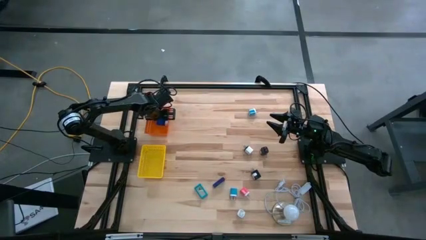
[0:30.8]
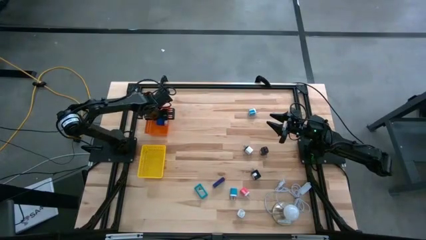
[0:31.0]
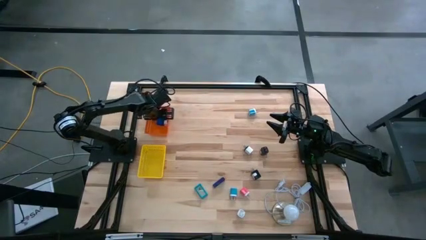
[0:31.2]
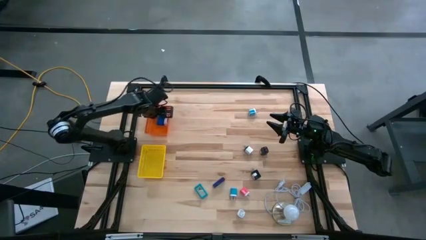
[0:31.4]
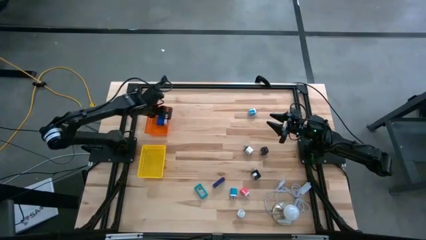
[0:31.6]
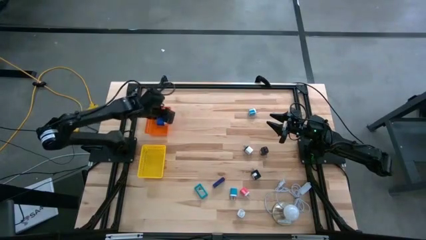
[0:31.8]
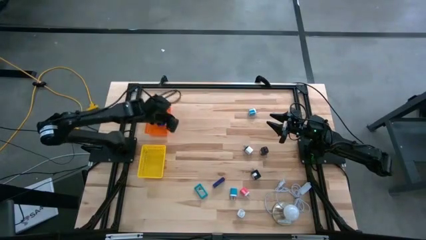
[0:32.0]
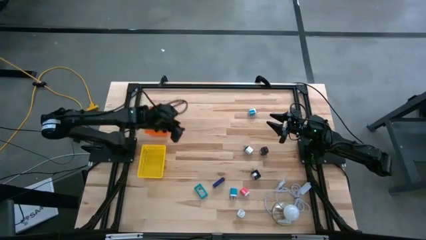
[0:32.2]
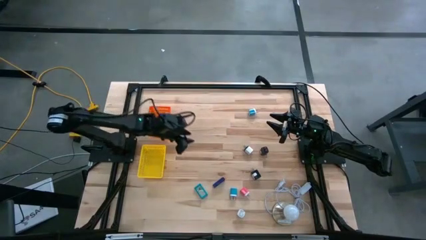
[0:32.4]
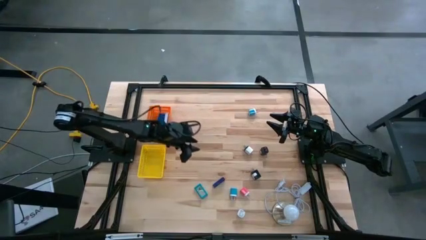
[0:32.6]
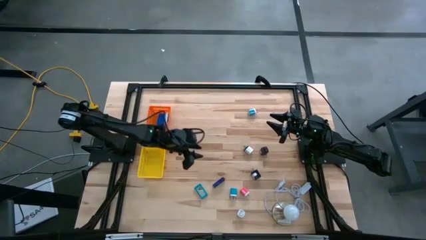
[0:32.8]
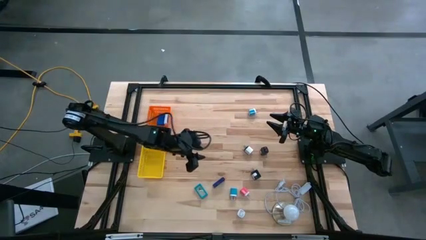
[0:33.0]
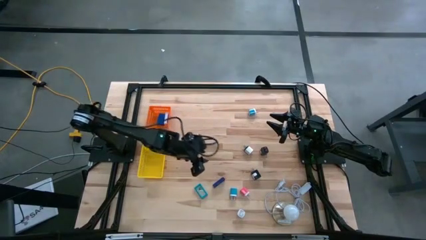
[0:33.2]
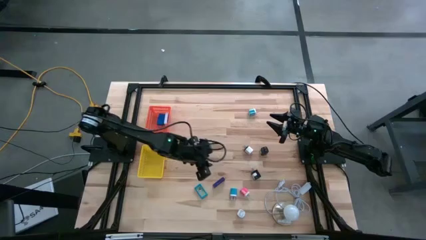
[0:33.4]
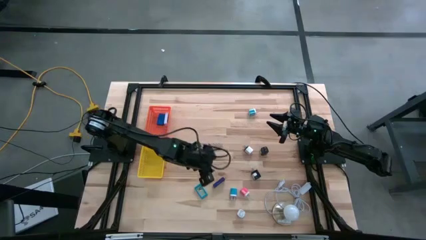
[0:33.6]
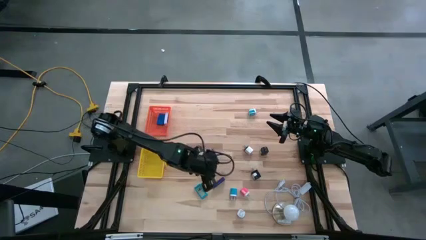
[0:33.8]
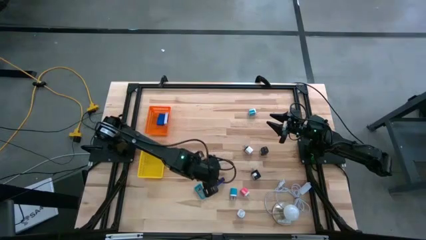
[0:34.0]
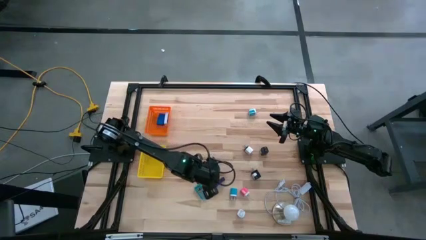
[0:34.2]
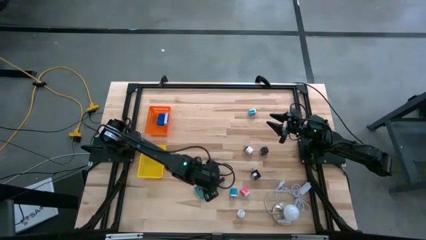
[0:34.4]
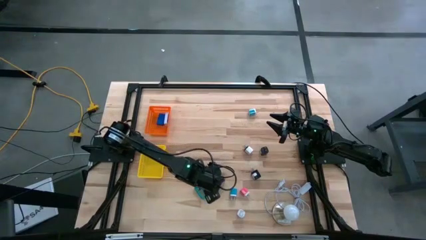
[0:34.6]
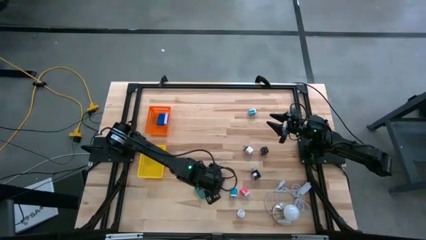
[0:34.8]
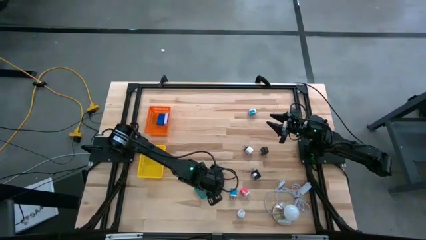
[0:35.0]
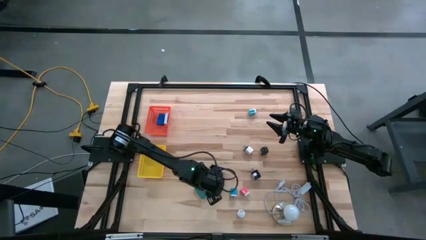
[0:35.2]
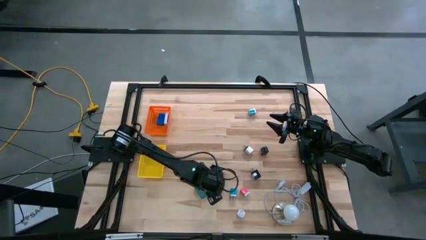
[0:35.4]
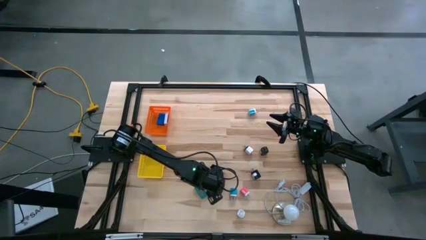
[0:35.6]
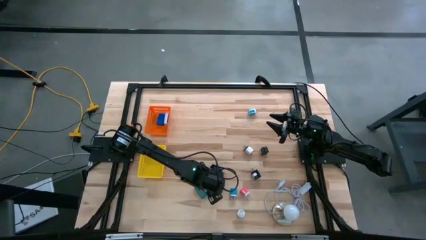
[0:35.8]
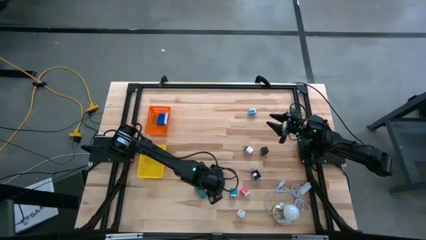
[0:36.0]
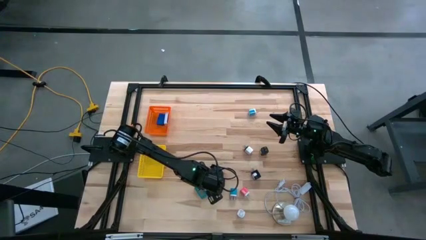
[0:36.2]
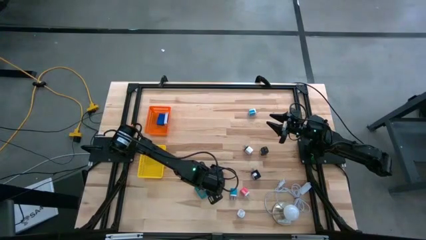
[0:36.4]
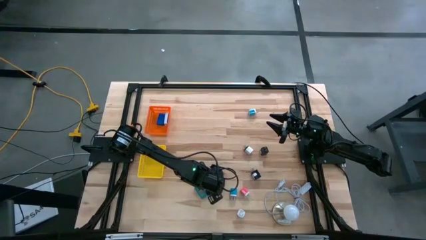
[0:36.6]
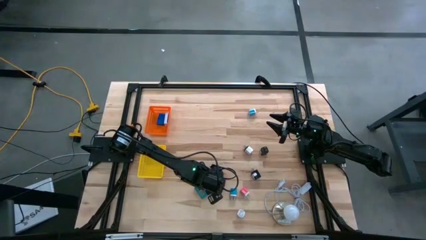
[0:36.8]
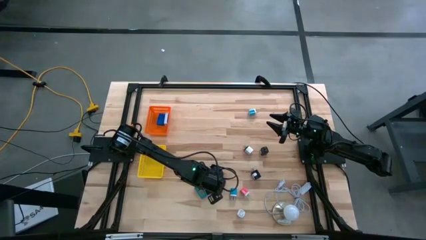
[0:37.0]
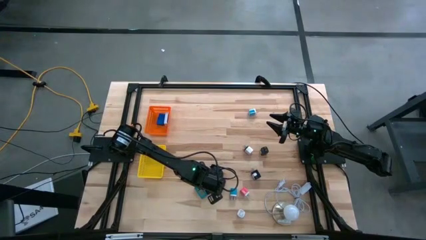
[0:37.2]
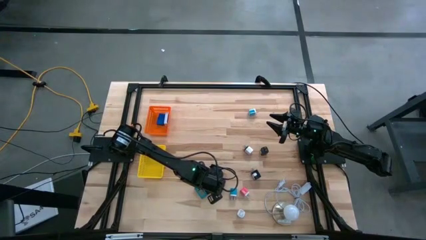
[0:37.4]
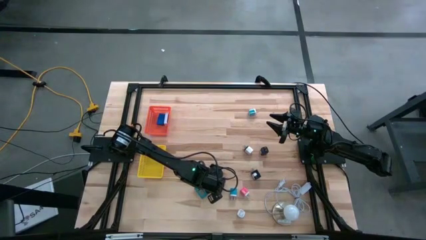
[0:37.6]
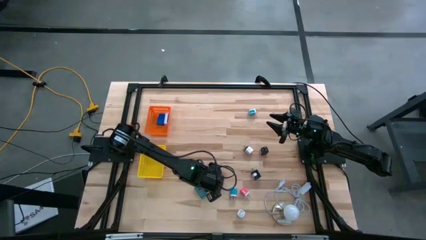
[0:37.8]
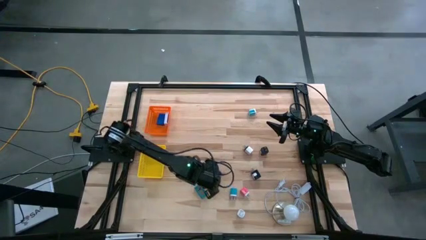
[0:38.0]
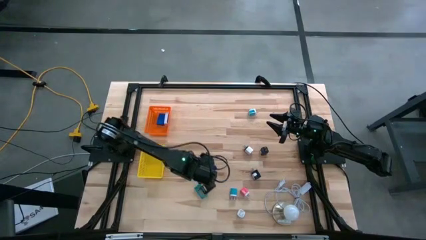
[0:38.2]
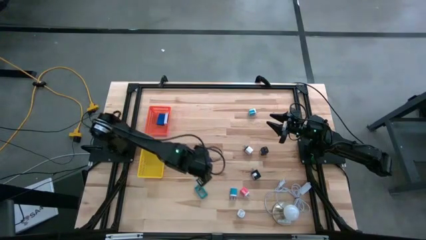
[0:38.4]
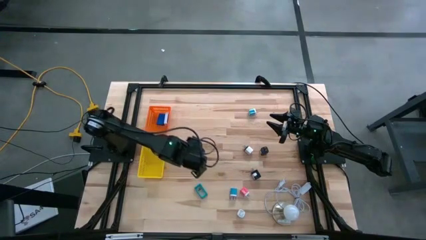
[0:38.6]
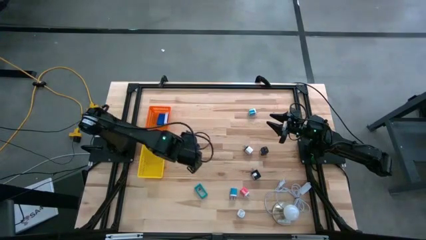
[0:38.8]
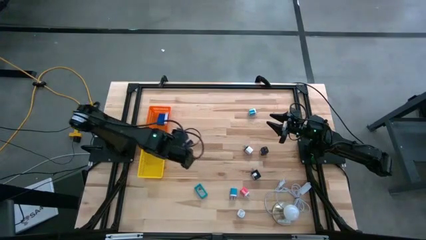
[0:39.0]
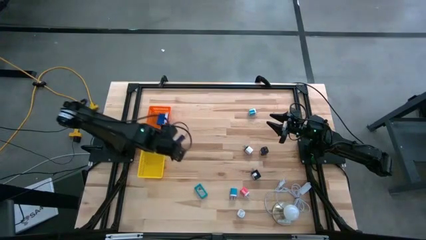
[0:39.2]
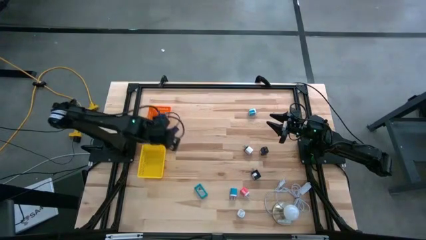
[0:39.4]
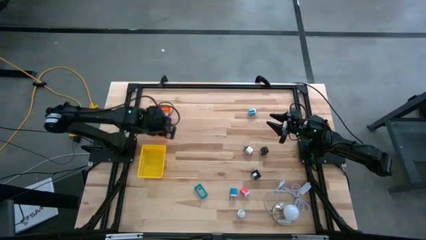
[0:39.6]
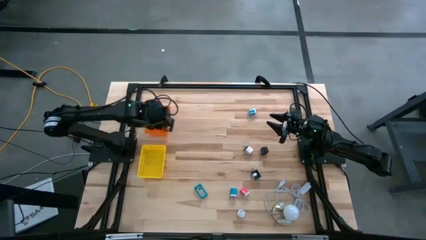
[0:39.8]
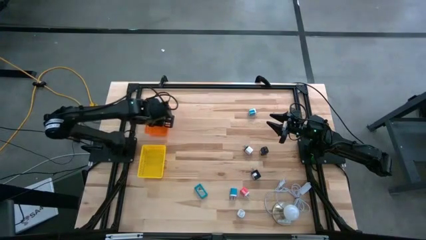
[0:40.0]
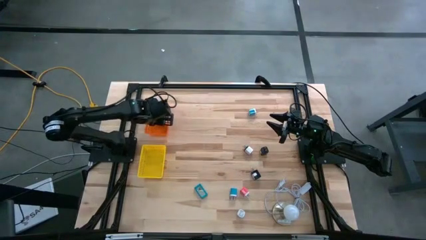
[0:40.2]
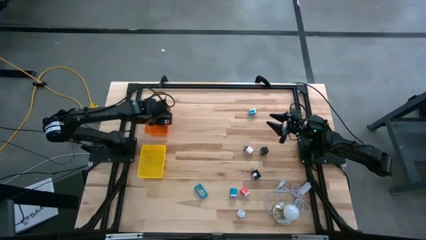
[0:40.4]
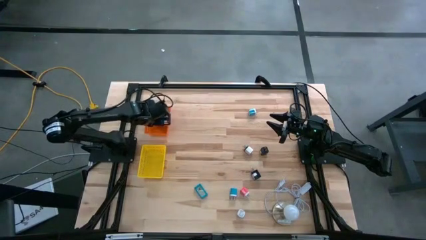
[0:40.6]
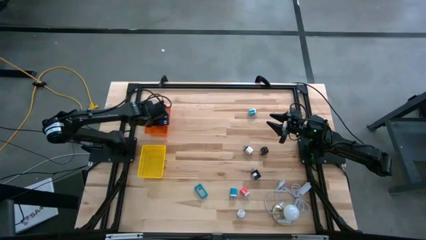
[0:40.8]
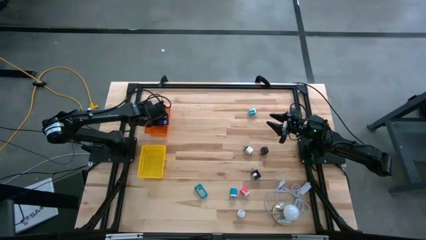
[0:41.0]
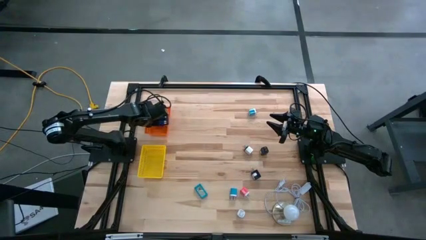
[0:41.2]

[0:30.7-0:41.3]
Task: Pick & Place Office items
Put the dark blue timer into the orange basket

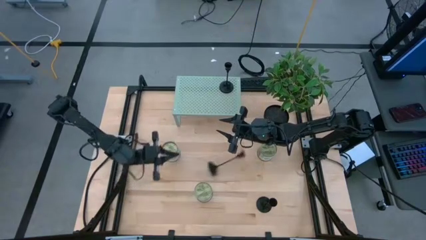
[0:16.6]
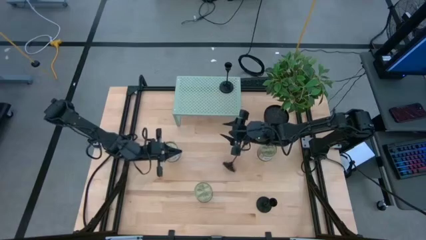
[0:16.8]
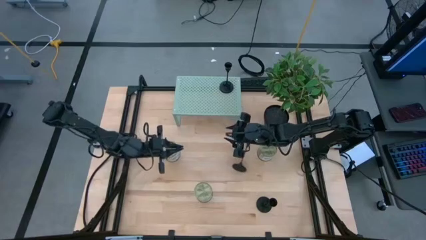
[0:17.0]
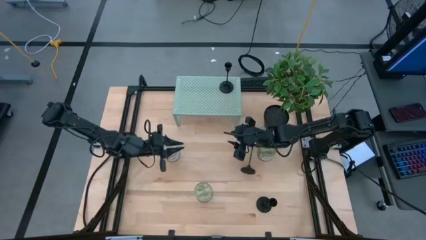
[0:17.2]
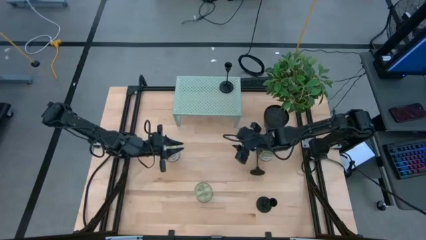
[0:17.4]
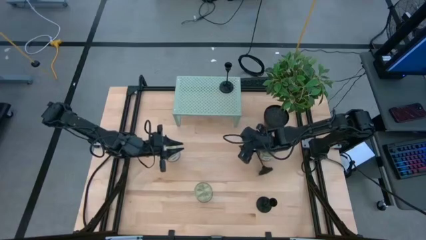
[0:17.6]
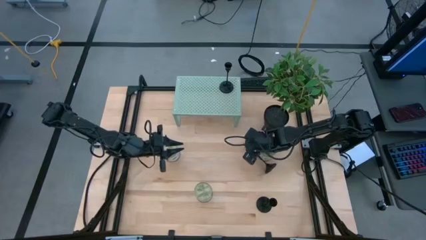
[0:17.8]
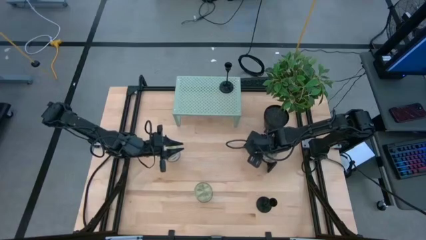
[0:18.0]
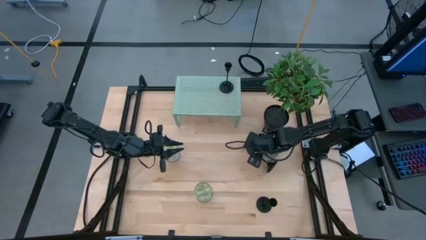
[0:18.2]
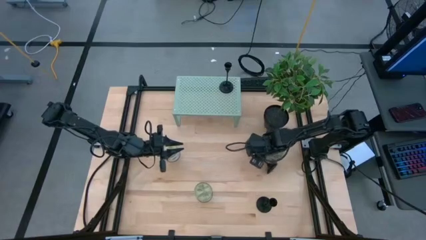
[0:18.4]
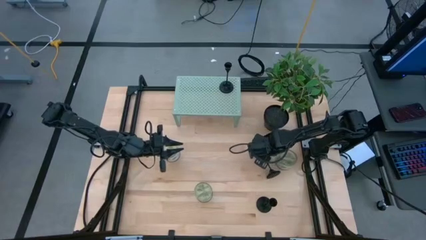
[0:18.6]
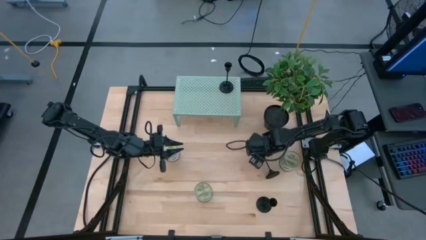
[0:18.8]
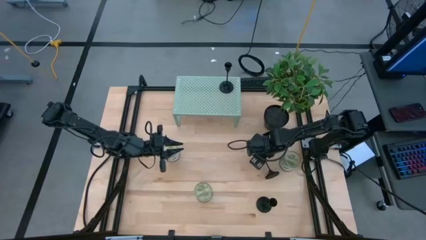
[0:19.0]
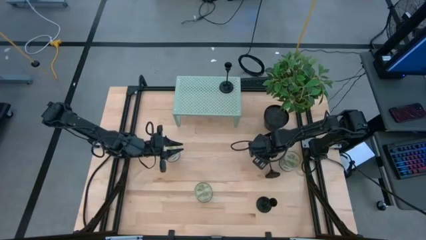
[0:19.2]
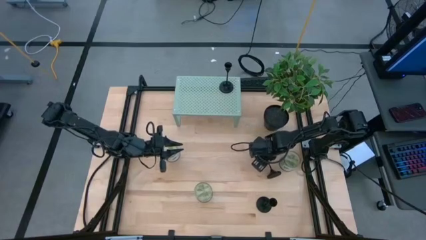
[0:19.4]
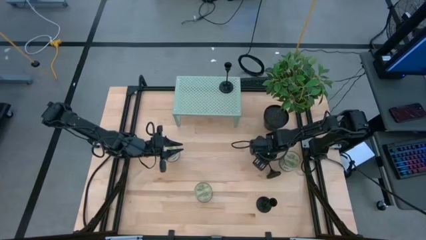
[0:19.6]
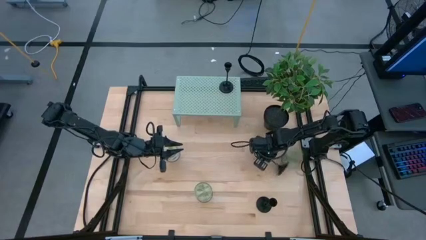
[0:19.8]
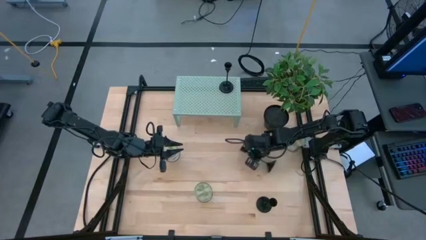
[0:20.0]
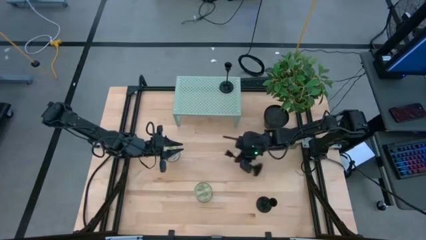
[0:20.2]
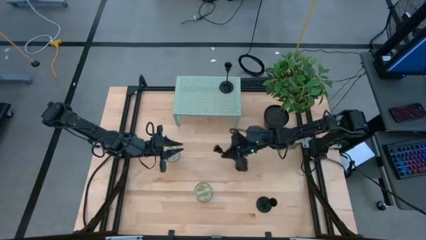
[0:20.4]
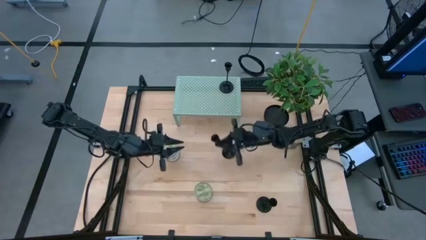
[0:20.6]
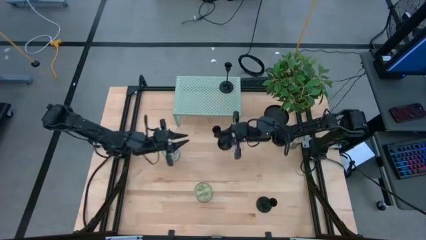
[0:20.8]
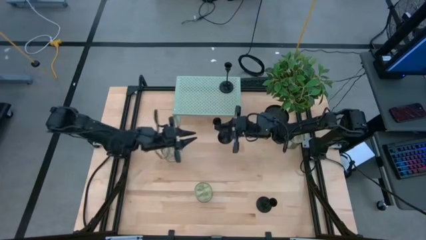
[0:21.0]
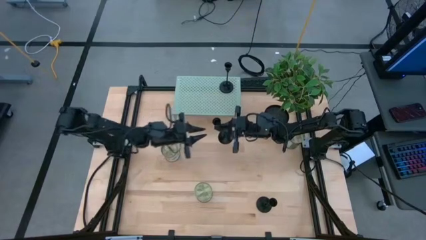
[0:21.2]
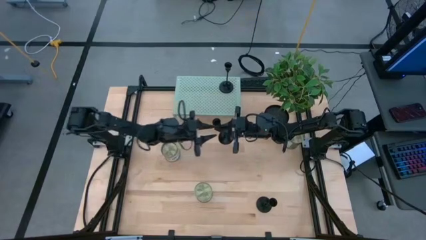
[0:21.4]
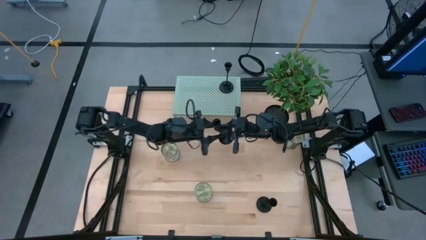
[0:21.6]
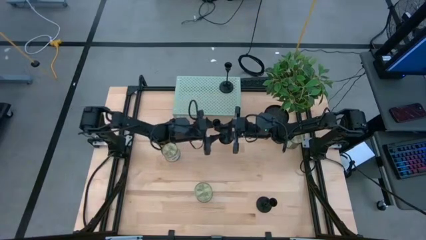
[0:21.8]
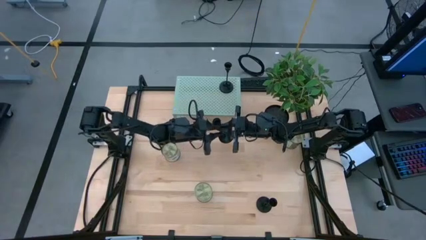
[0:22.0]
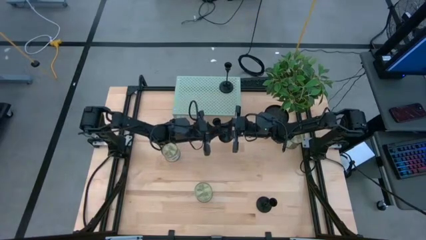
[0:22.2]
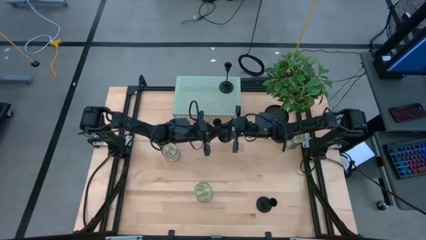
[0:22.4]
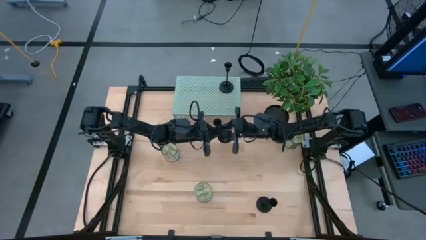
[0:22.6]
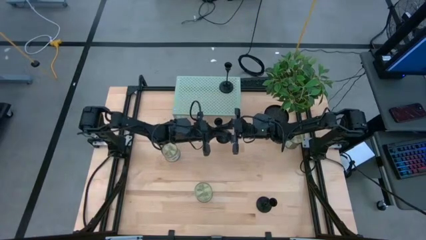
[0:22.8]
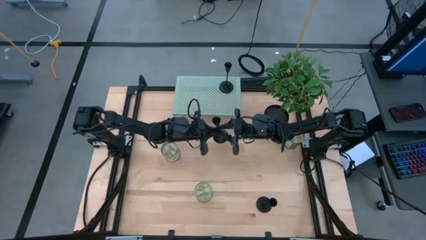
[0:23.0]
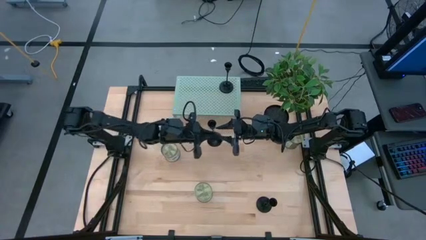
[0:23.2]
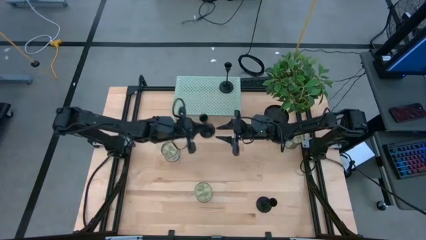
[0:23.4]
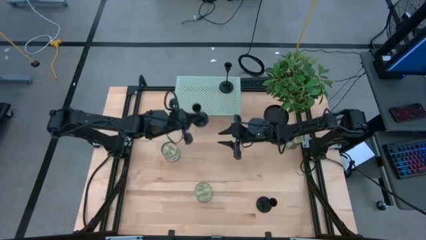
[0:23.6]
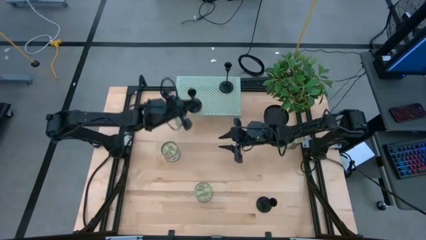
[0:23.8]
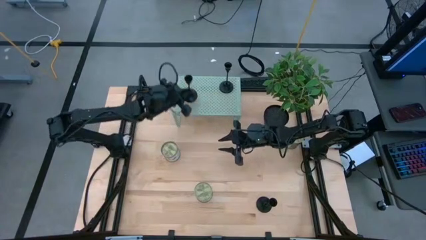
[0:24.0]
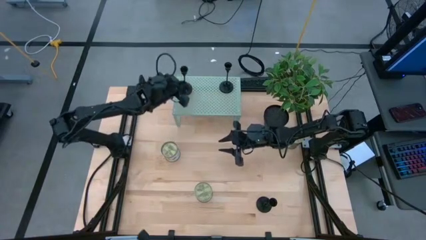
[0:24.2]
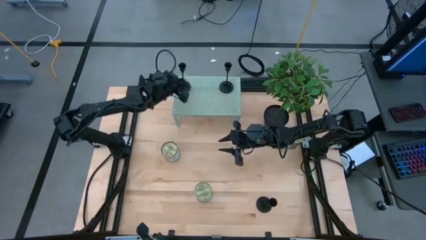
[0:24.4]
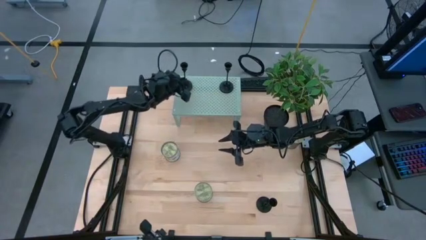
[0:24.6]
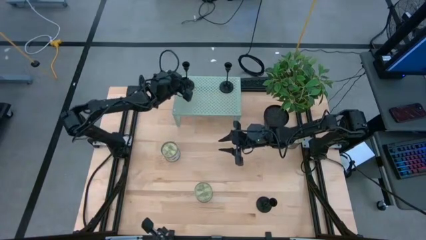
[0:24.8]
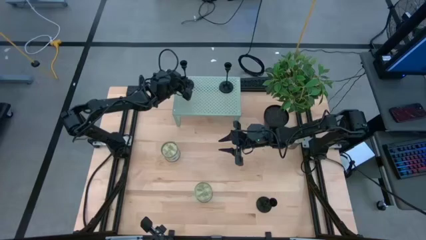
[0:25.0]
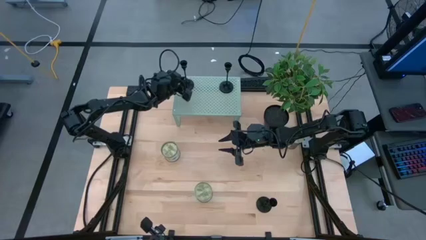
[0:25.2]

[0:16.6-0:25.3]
Task: Pick & Place candle stick holders
Put the left candle holder on the shelf
